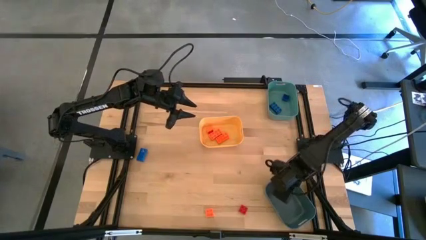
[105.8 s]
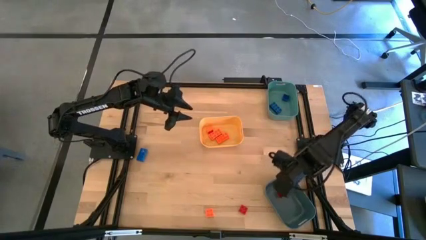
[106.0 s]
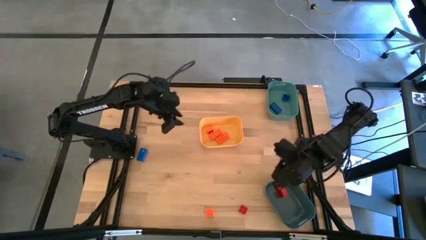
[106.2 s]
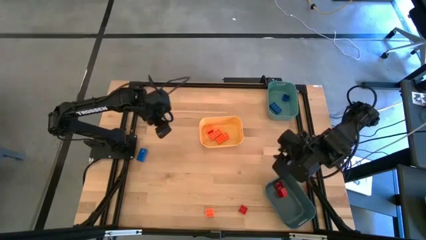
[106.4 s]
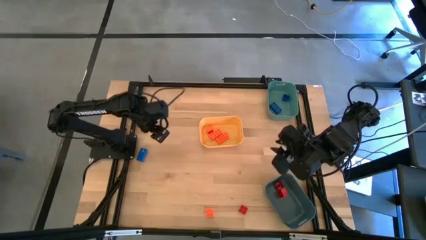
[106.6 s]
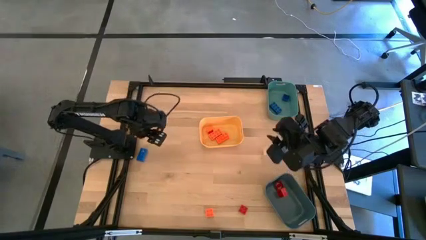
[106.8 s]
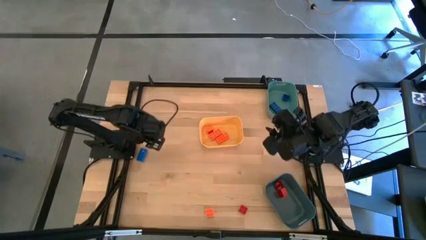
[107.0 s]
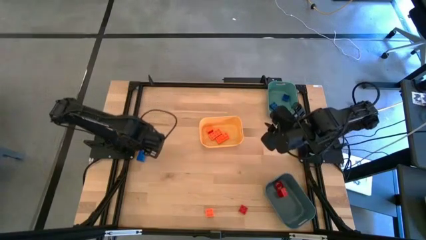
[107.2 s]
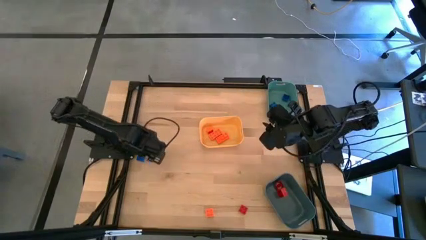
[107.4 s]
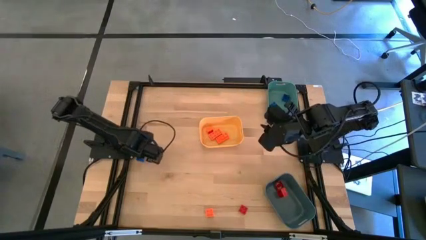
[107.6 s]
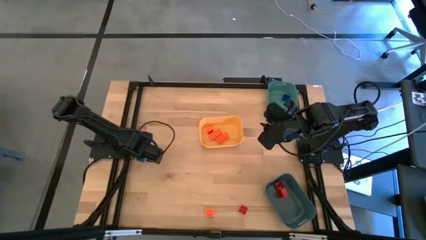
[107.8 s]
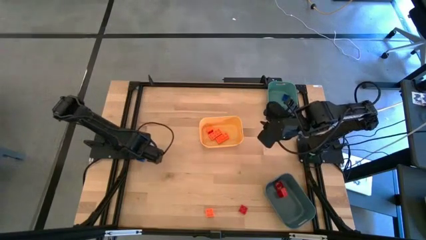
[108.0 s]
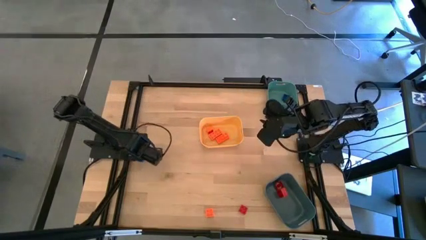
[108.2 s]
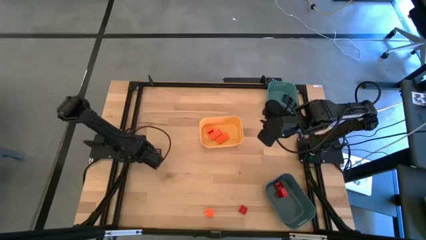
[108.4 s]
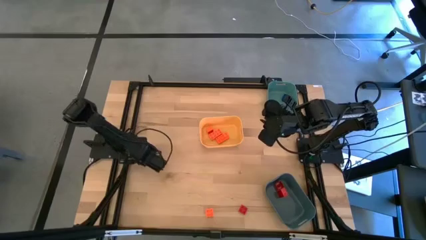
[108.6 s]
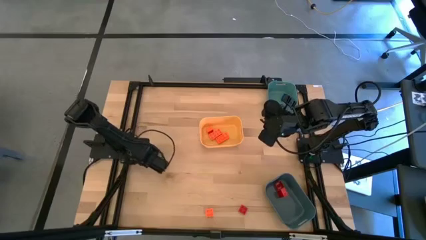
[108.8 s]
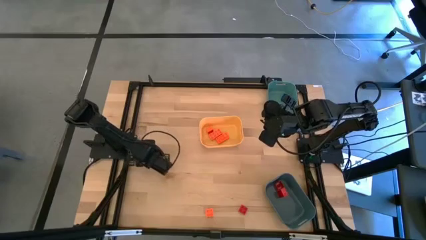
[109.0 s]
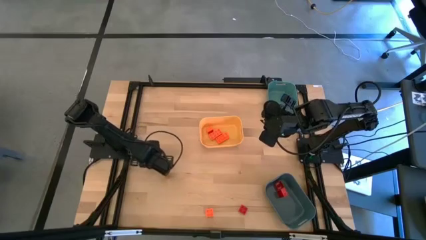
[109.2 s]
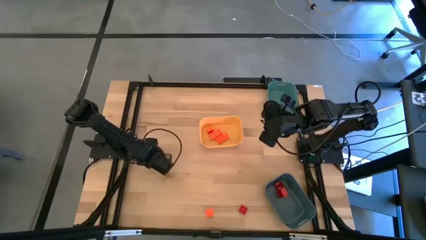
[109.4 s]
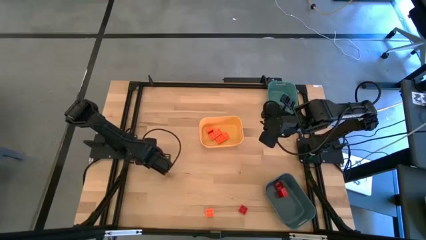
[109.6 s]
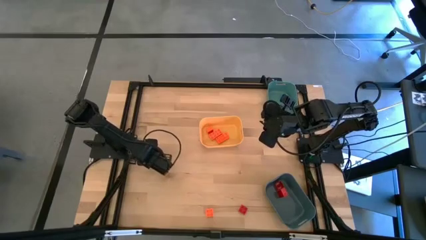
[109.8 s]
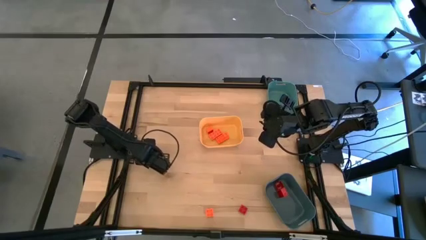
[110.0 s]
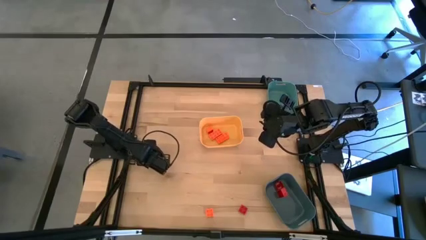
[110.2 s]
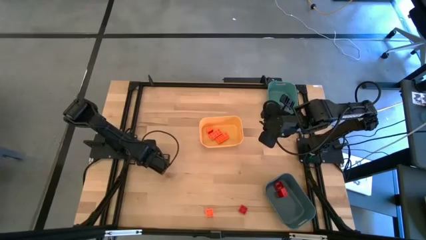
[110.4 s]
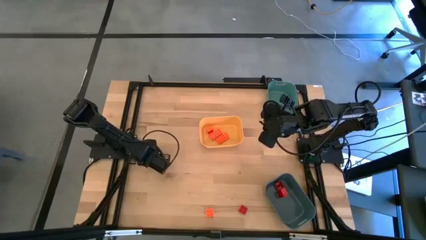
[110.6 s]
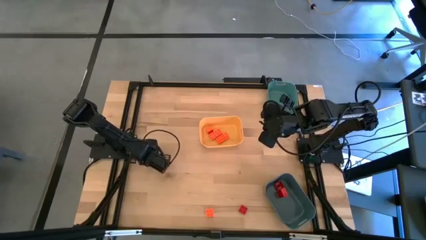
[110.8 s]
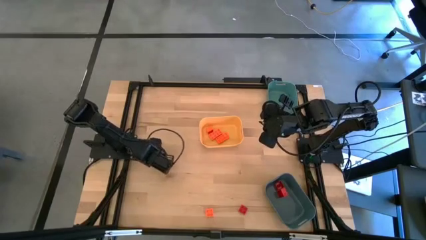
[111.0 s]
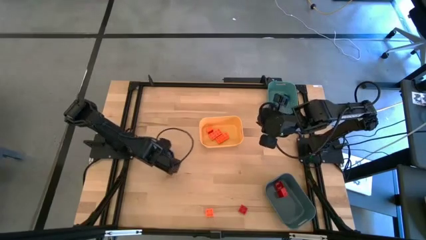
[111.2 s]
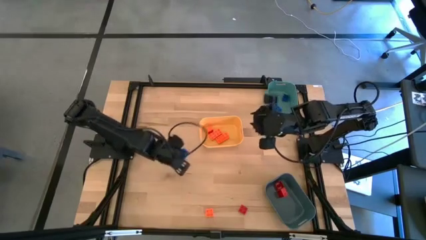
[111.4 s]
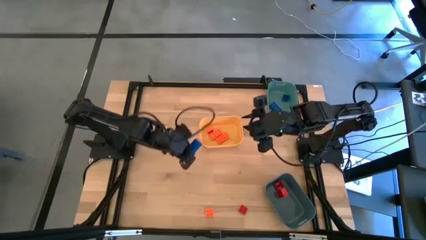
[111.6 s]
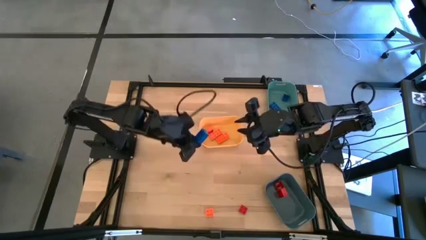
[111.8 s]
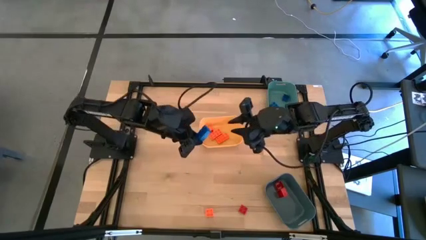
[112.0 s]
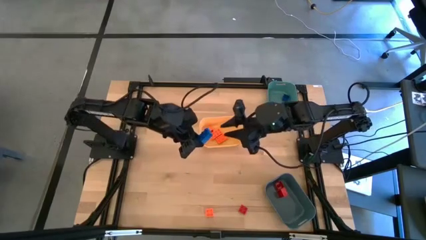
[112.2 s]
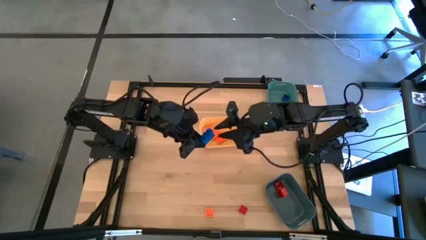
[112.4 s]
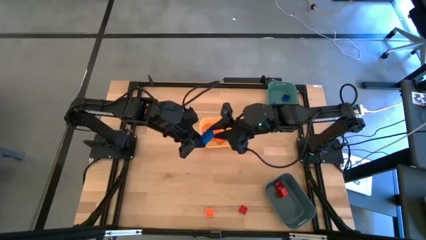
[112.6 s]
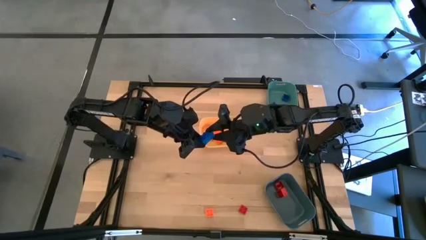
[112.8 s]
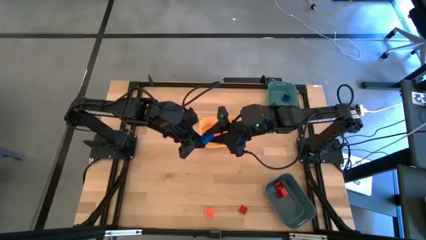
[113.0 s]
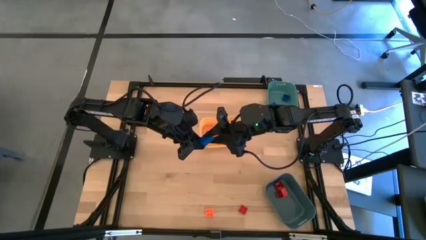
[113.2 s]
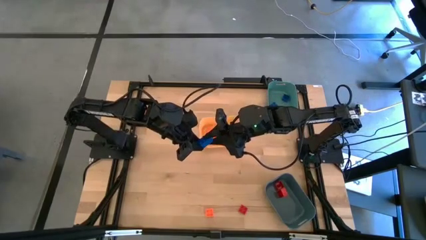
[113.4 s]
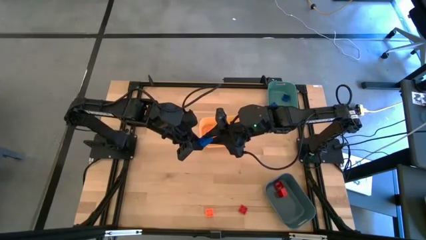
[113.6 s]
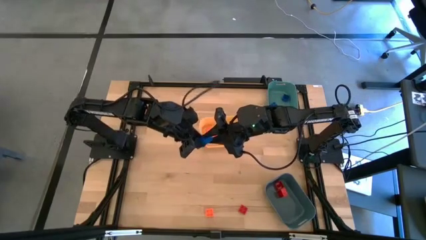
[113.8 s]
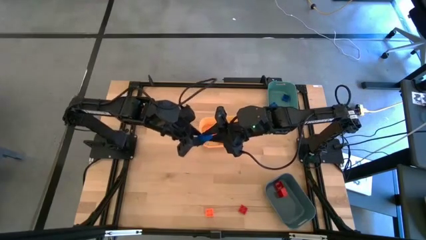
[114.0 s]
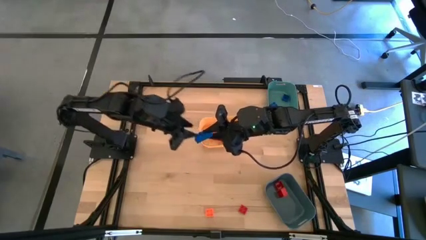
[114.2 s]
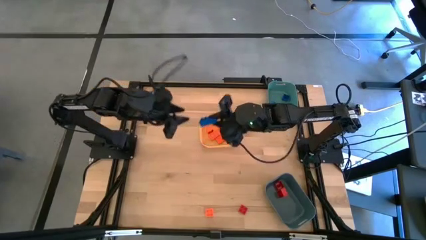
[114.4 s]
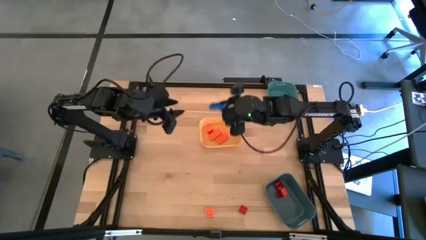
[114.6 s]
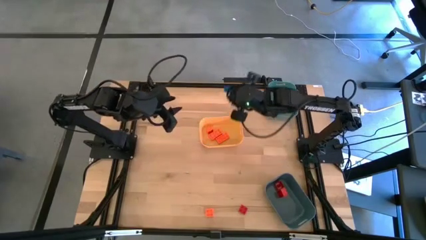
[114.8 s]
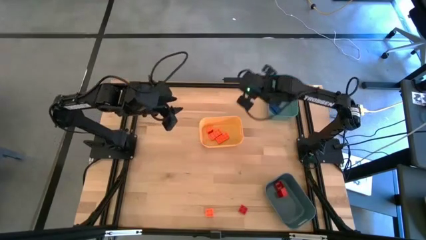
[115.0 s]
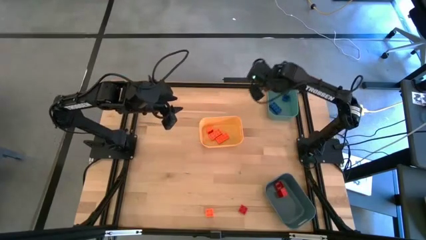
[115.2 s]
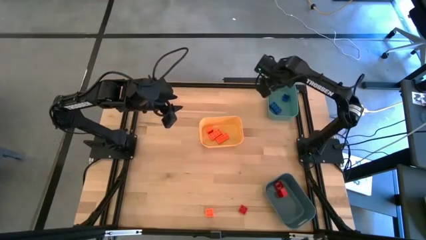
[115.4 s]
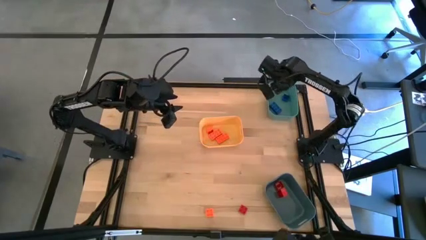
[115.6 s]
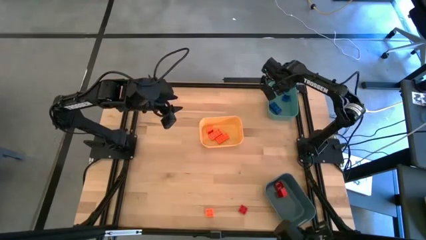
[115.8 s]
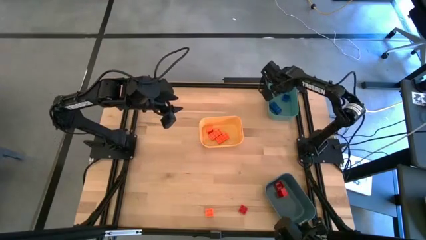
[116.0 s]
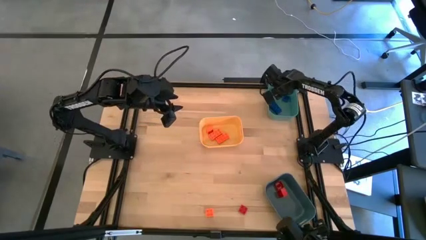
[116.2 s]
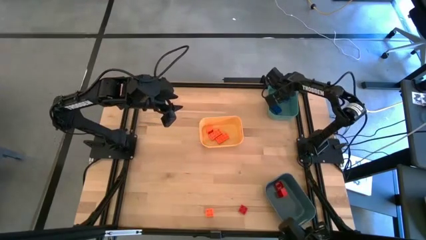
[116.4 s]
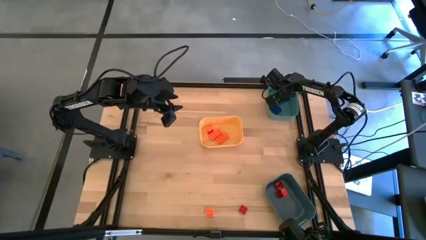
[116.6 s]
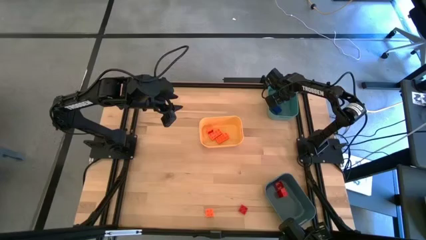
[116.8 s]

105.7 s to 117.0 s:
Task: Sort & place blocks by color
Put the blue game piece into the green bin

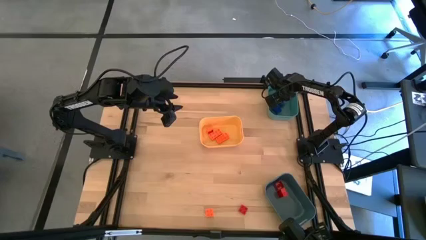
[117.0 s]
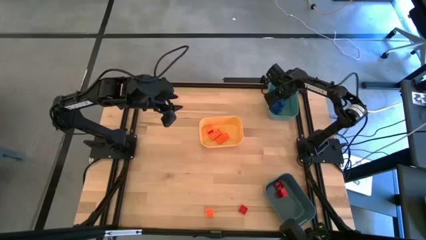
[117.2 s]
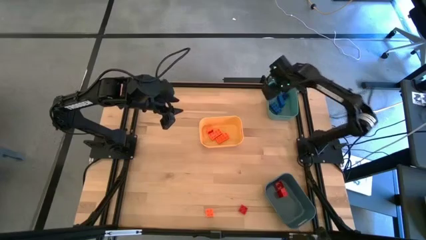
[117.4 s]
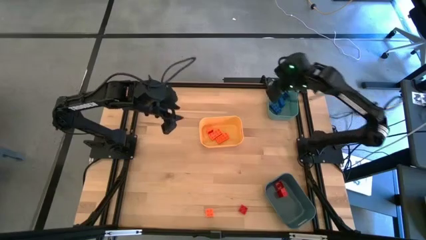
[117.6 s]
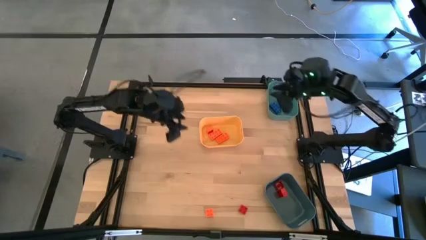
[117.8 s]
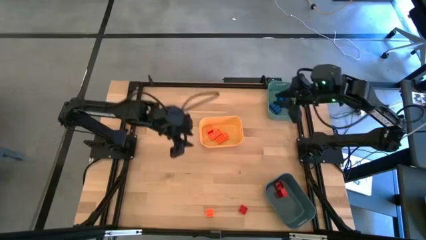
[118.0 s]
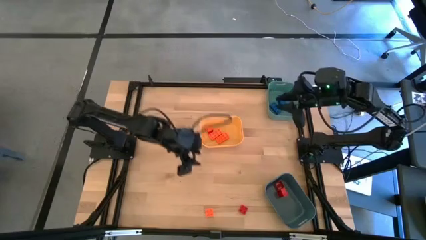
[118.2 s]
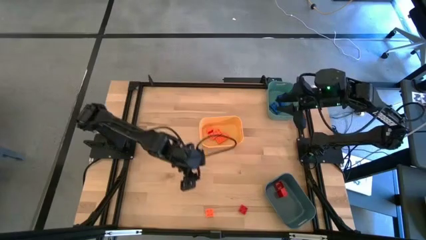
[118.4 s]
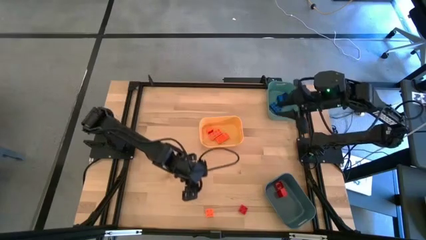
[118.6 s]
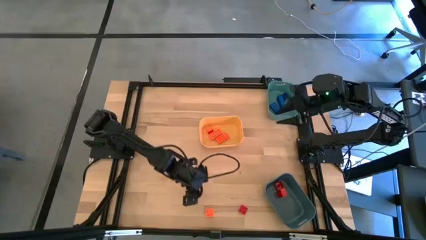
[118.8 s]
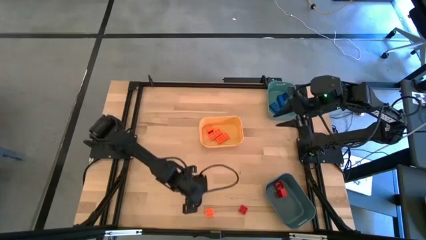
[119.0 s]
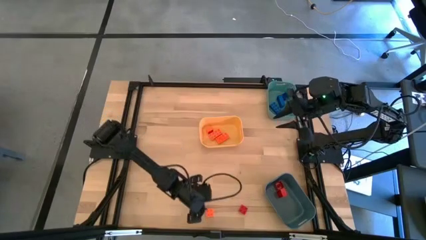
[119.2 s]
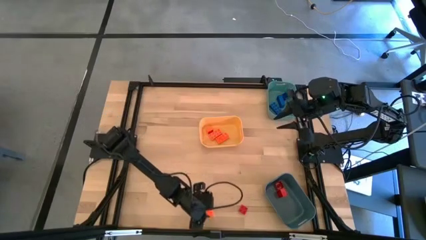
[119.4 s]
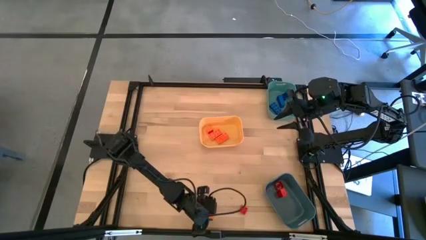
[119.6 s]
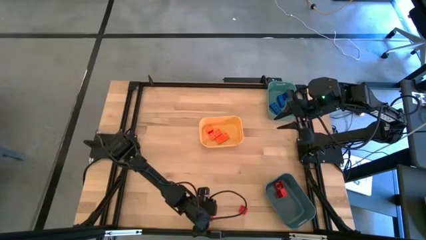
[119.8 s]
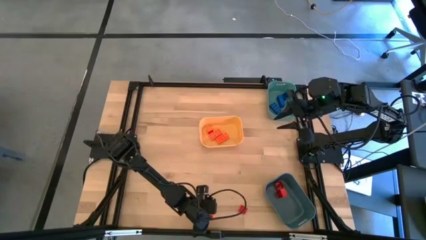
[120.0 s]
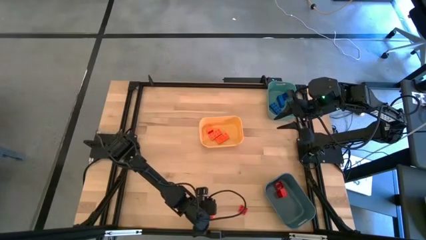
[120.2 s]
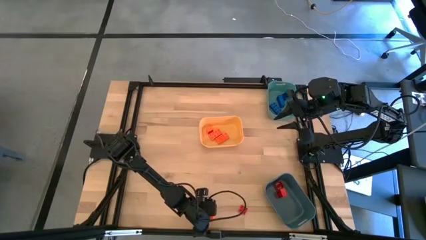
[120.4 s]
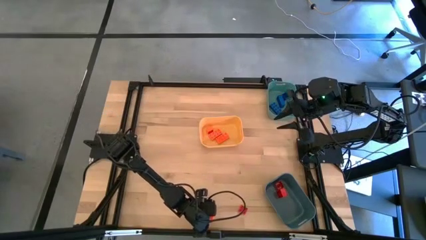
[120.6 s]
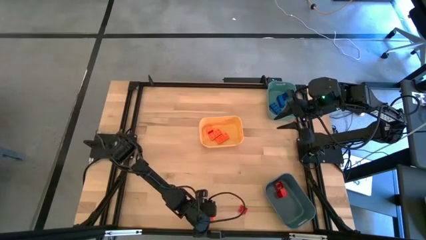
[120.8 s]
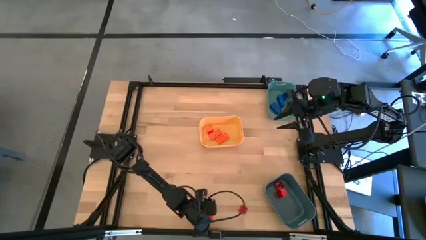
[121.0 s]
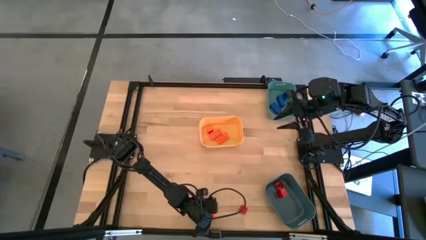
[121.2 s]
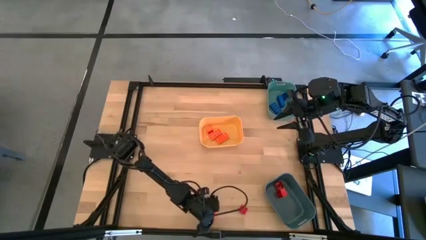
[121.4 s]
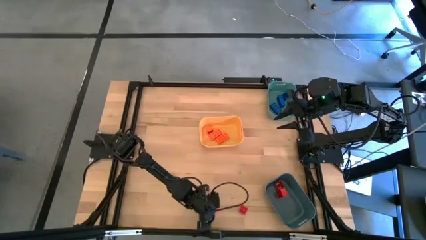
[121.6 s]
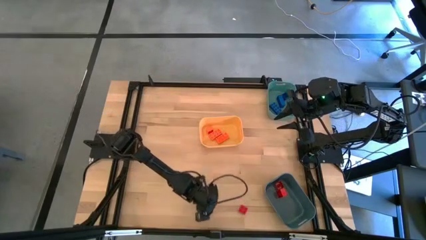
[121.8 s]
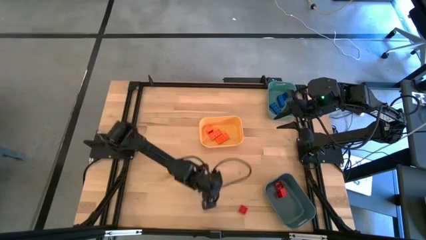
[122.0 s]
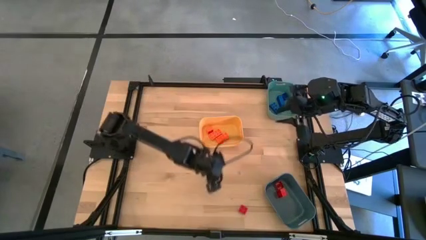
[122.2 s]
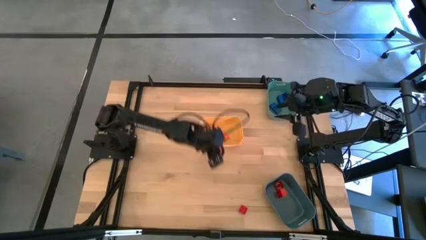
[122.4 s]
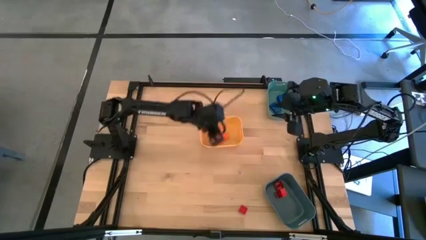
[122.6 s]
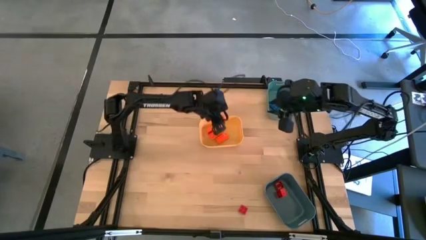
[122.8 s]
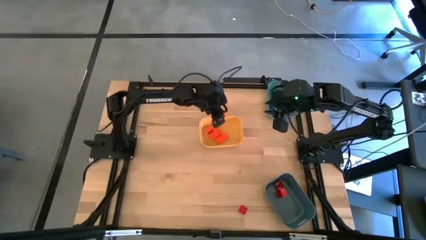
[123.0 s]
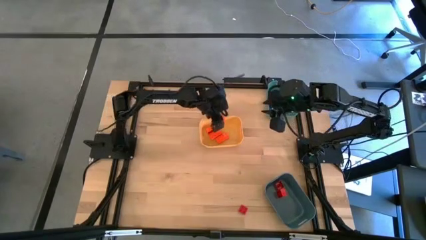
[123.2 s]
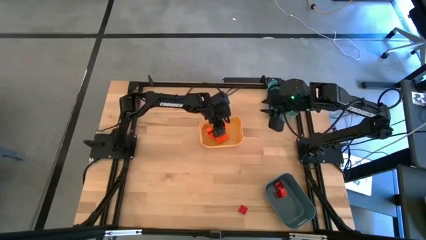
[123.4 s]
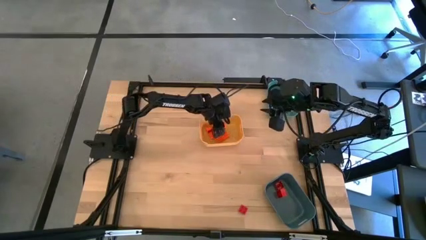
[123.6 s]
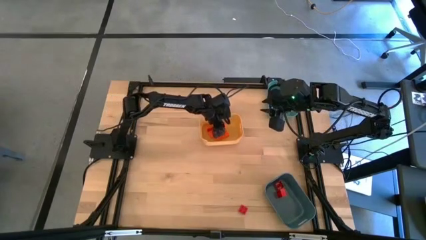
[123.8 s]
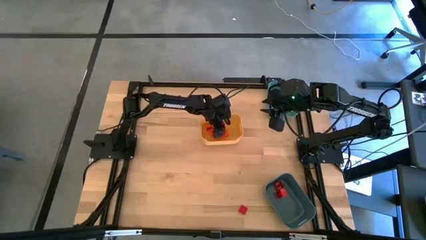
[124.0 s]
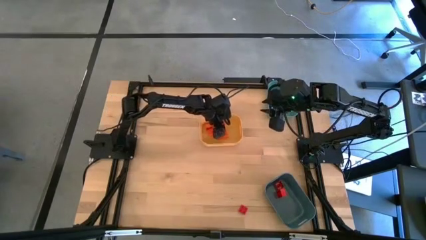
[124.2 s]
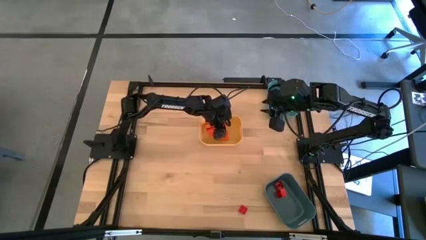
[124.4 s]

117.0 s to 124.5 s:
Put the orange game piece into the yellow bin
